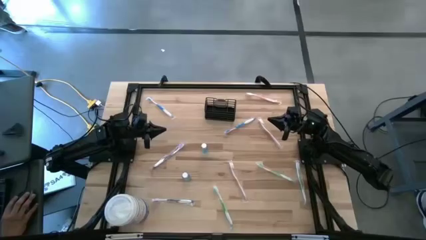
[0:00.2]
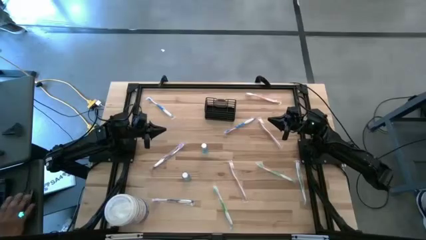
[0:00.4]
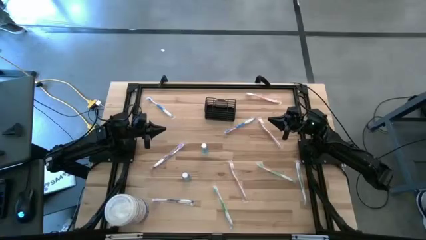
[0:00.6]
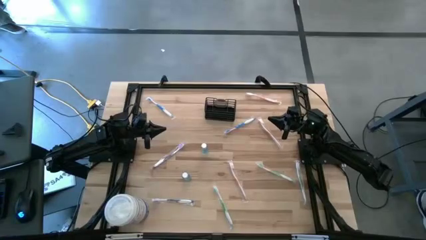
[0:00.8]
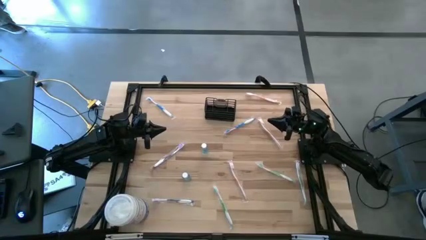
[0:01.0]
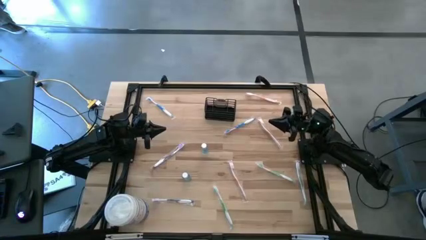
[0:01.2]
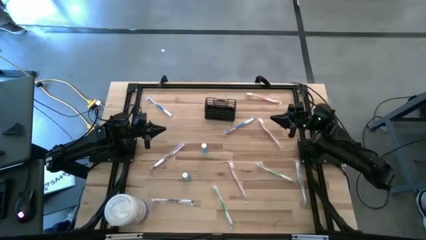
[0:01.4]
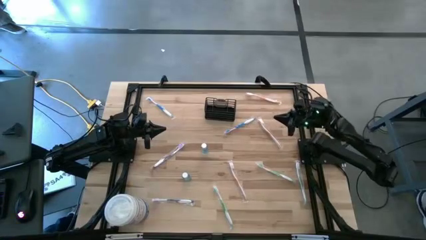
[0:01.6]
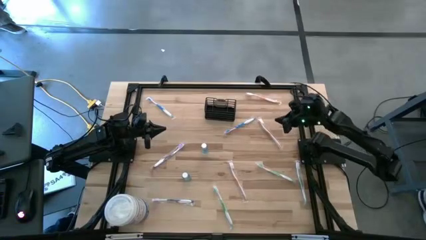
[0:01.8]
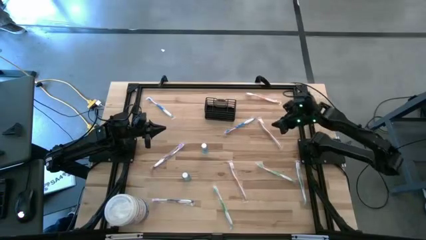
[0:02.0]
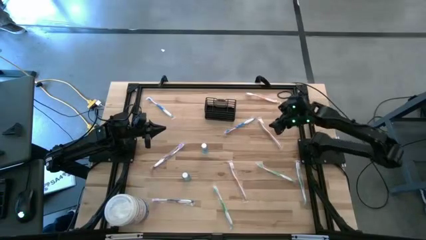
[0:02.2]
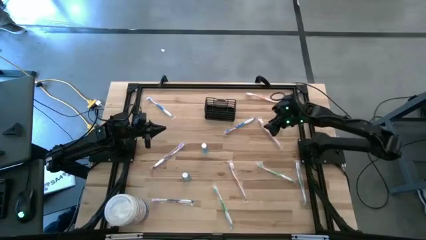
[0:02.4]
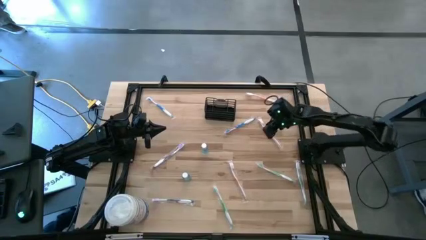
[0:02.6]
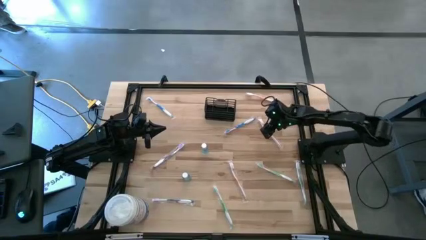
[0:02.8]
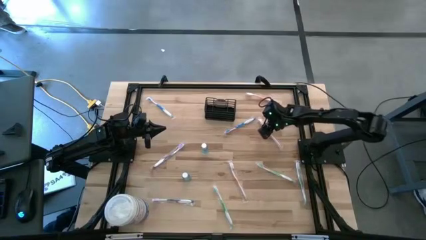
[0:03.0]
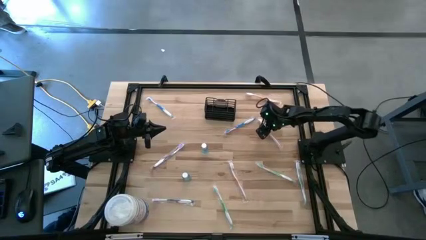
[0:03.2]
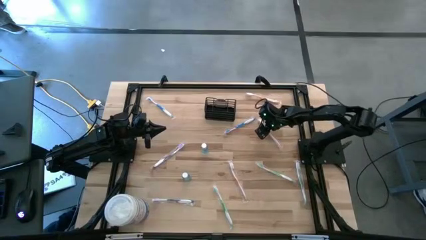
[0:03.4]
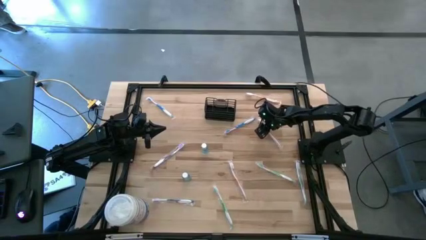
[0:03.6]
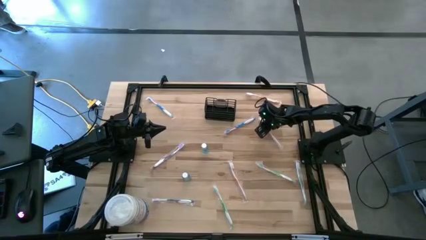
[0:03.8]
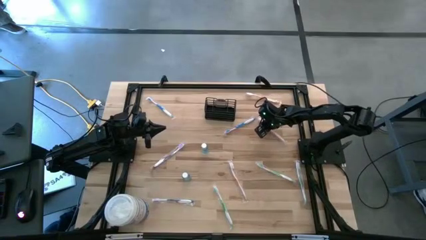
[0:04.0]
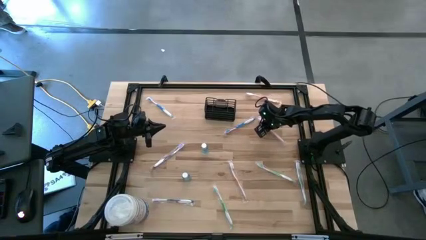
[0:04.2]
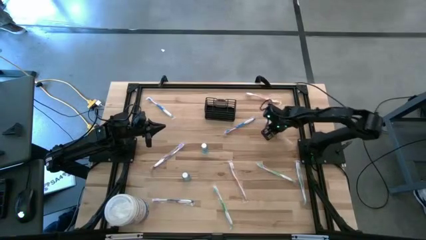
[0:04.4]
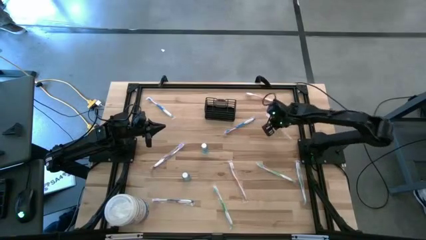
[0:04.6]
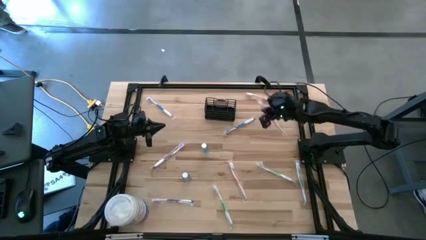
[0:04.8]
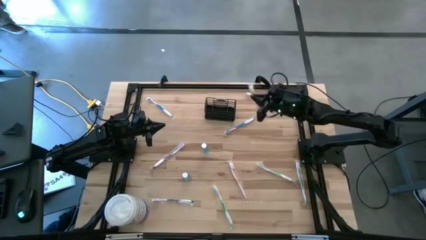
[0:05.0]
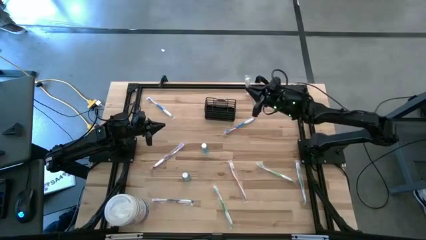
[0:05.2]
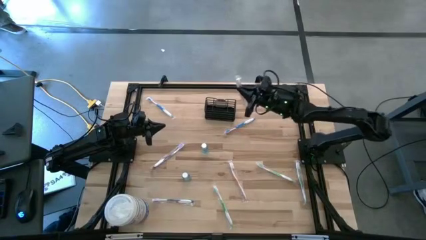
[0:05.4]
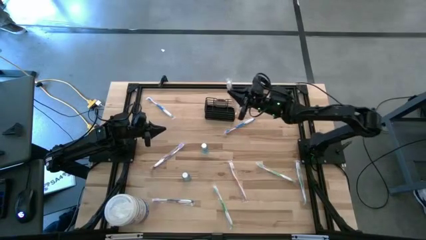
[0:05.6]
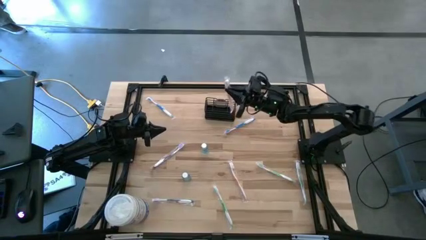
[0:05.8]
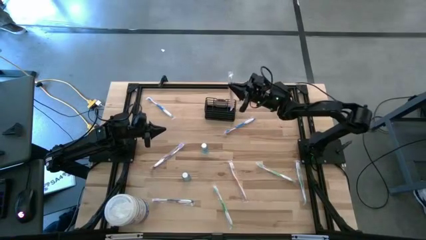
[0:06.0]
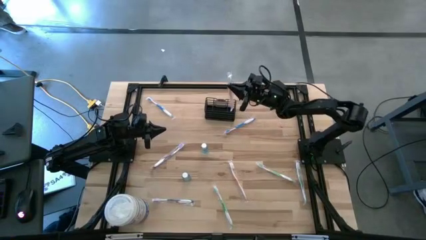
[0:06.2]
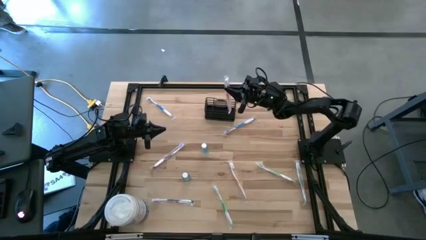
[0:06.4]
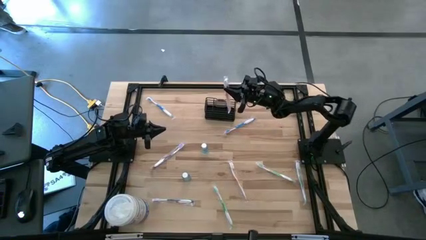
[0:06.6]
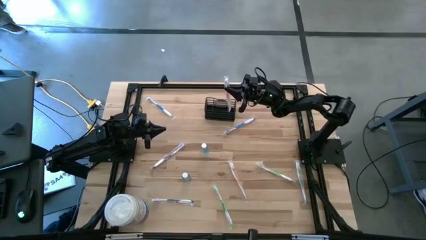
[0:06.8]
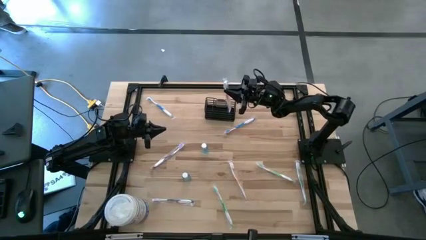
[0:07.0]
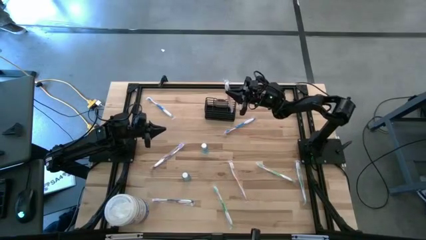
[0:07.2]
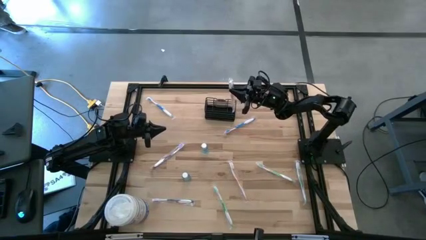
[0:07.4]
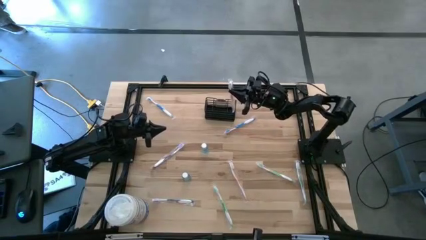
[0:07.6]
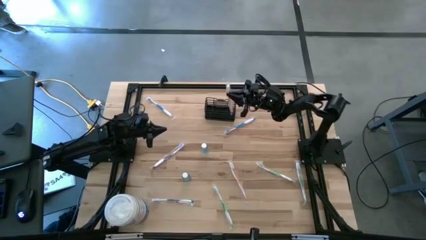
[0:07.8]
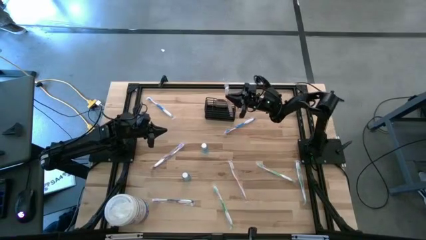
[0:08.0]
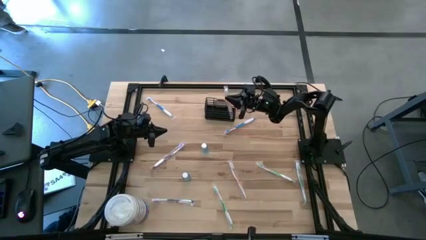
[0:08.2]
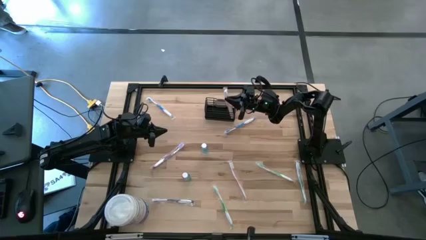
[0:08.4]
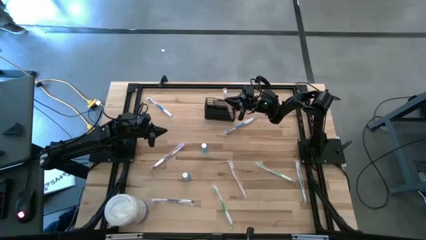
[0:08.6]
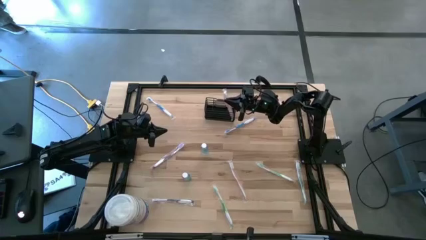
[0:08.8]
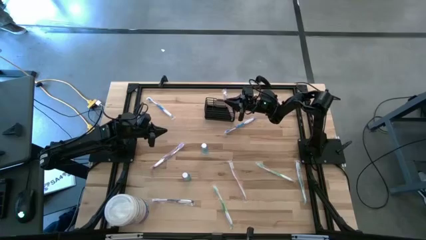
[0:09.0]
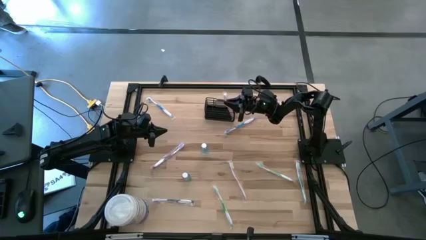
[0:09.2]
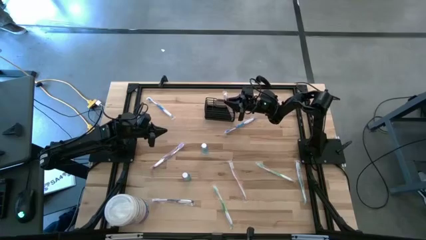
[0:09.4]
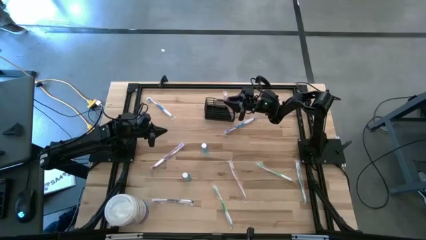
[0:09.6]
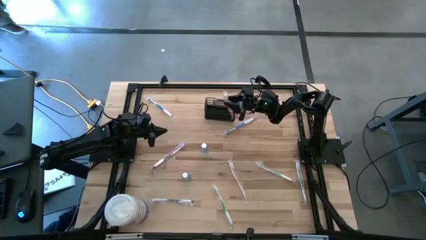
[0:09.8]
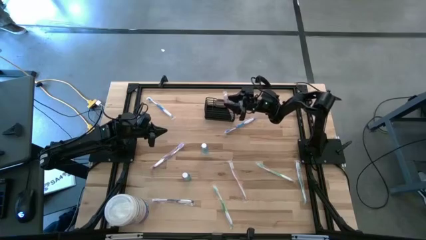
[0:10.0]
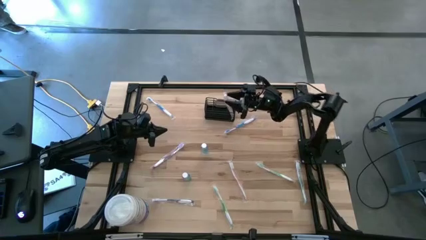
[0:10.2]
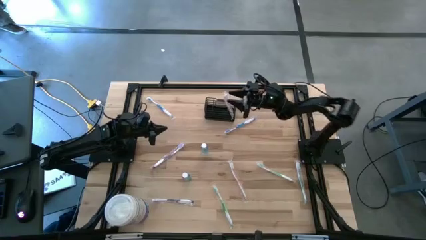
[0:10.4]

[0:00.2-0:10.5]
Task: Pick & Place toothbrushing station
Put the middle orange toothbrush into the mesh organizer
